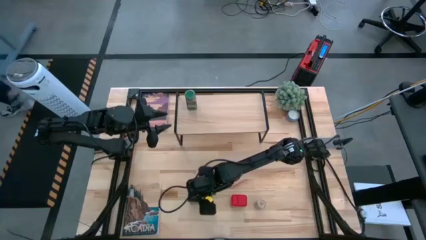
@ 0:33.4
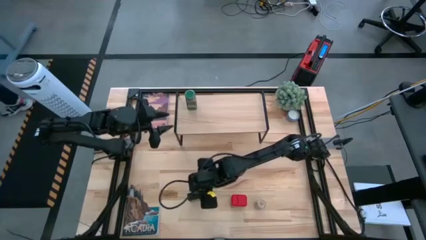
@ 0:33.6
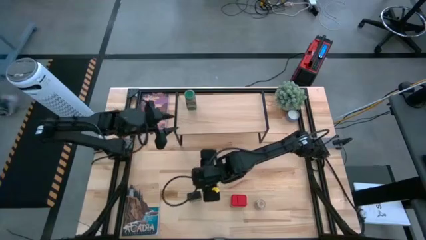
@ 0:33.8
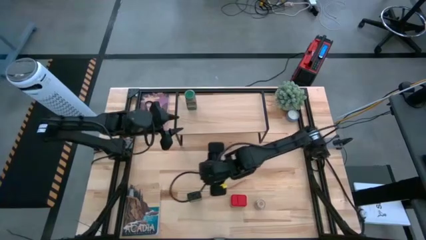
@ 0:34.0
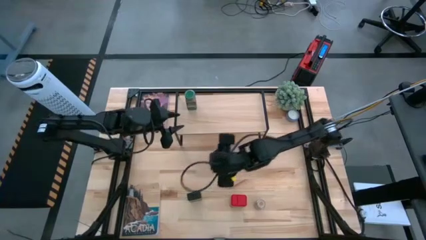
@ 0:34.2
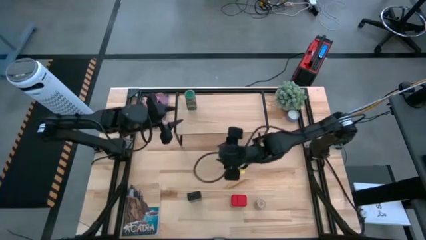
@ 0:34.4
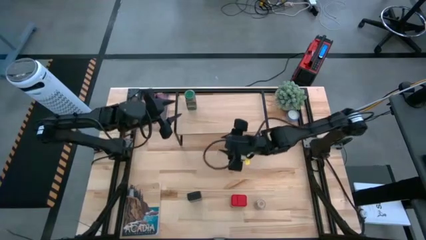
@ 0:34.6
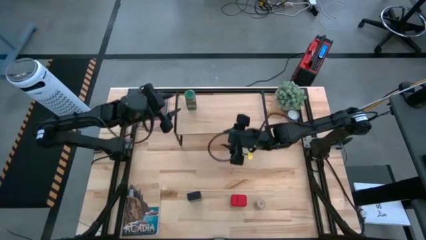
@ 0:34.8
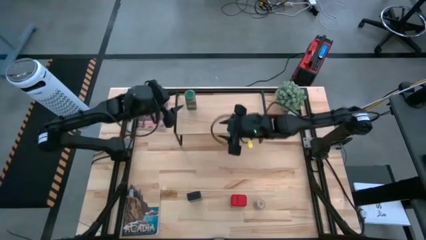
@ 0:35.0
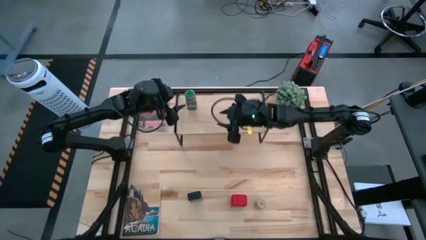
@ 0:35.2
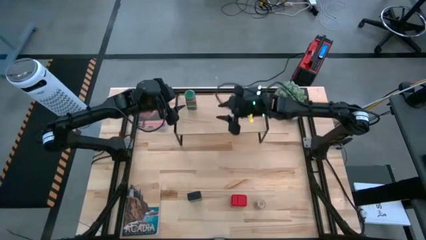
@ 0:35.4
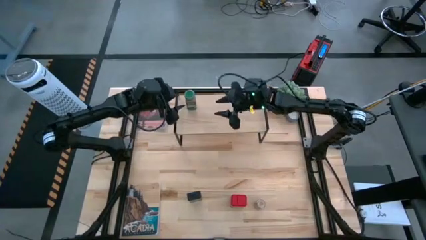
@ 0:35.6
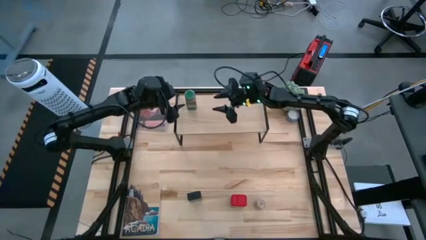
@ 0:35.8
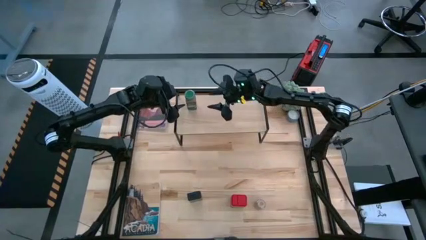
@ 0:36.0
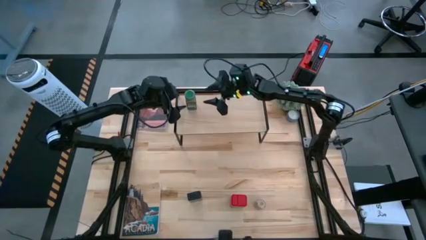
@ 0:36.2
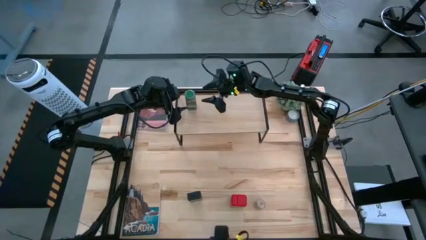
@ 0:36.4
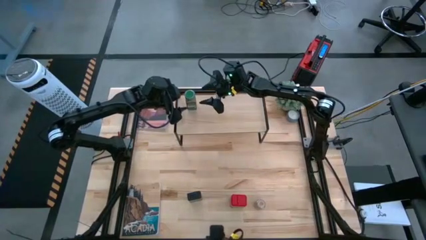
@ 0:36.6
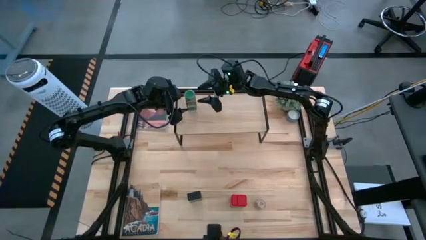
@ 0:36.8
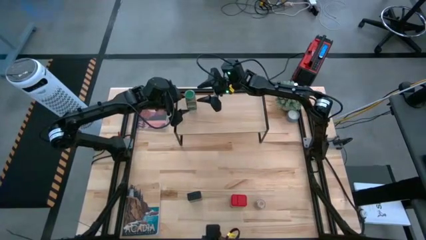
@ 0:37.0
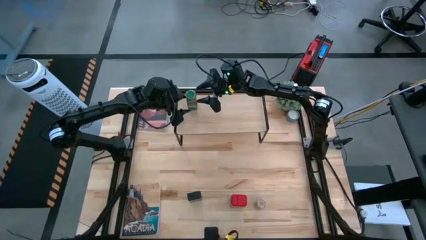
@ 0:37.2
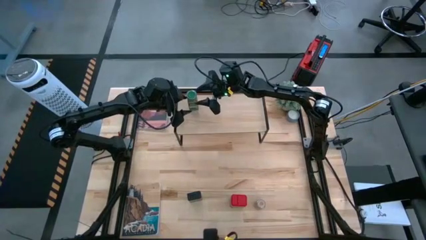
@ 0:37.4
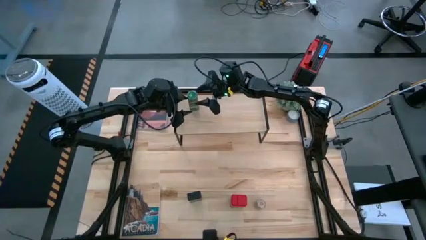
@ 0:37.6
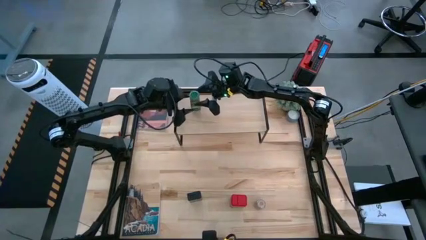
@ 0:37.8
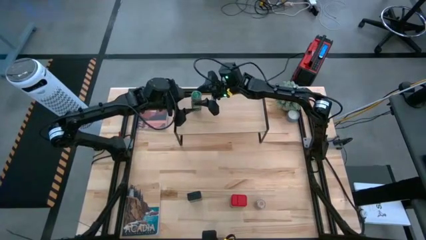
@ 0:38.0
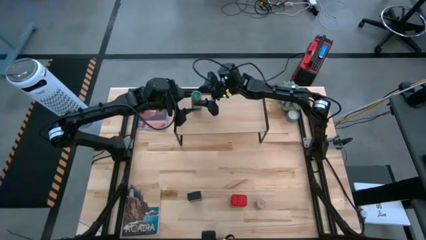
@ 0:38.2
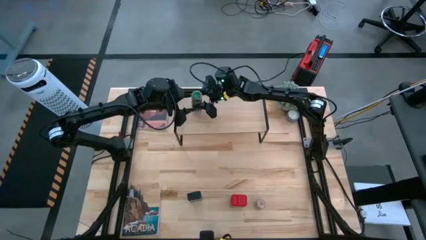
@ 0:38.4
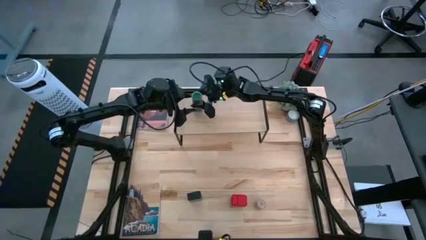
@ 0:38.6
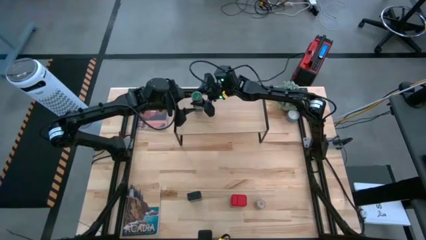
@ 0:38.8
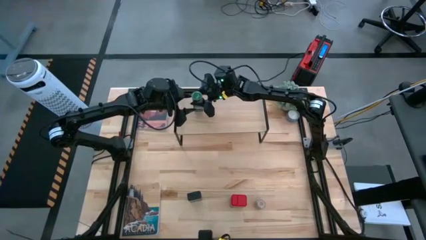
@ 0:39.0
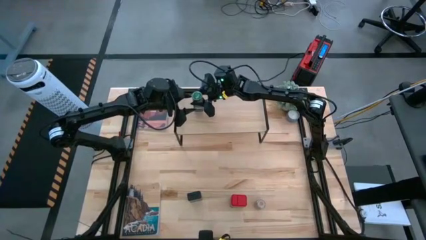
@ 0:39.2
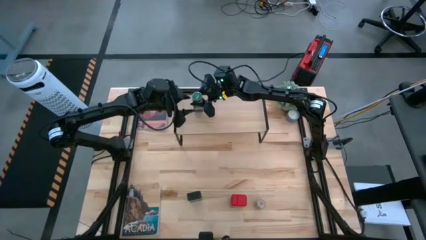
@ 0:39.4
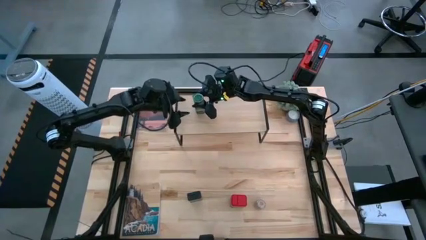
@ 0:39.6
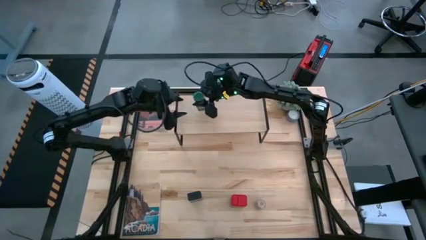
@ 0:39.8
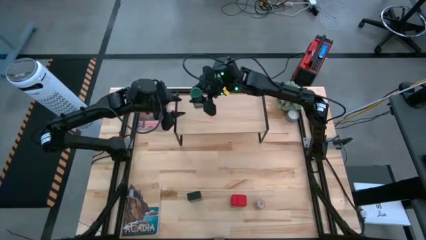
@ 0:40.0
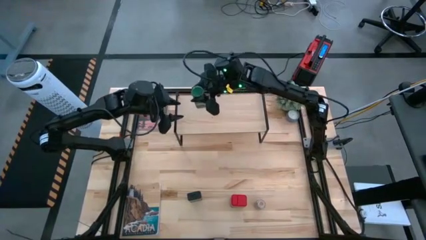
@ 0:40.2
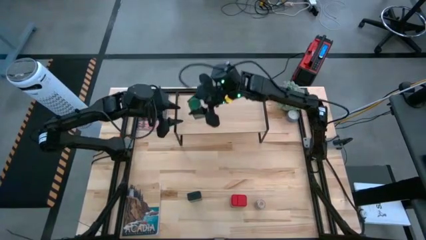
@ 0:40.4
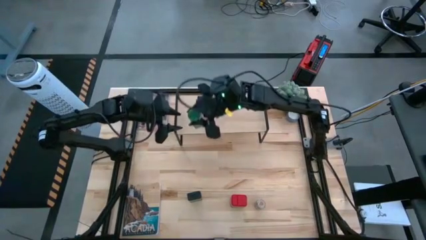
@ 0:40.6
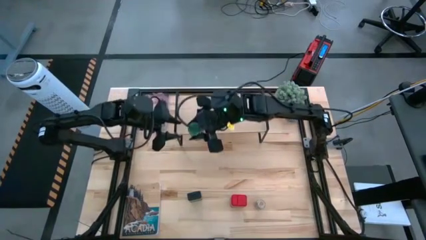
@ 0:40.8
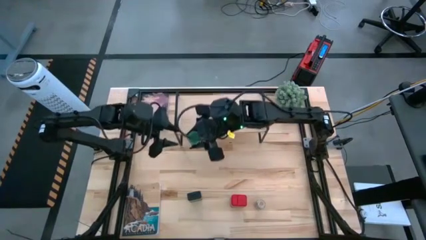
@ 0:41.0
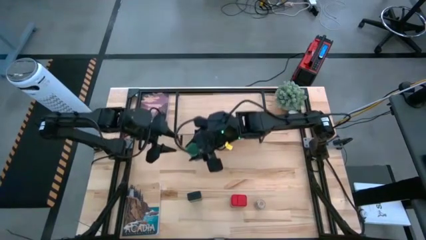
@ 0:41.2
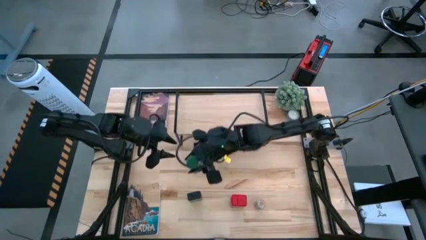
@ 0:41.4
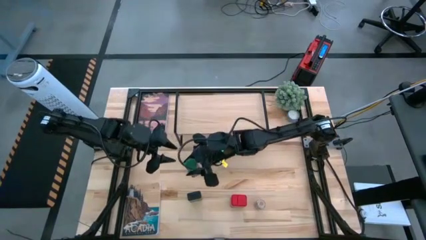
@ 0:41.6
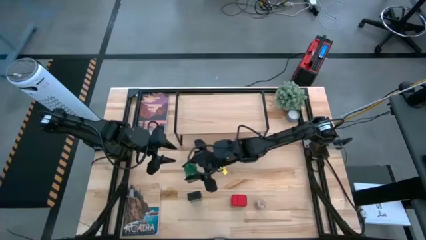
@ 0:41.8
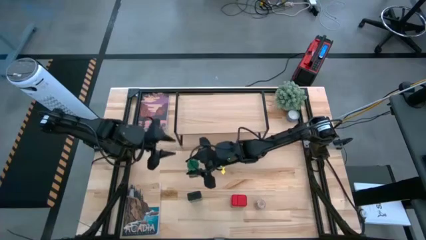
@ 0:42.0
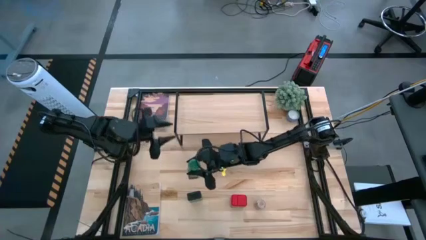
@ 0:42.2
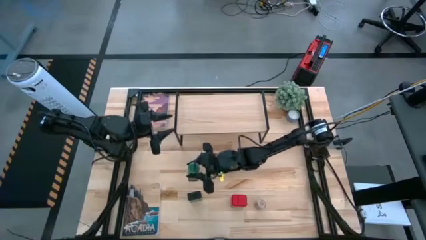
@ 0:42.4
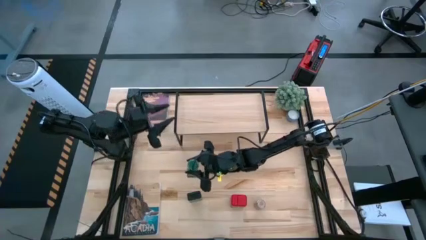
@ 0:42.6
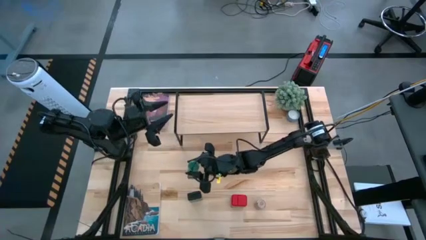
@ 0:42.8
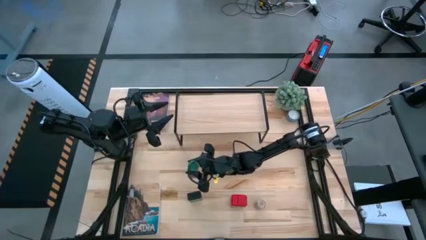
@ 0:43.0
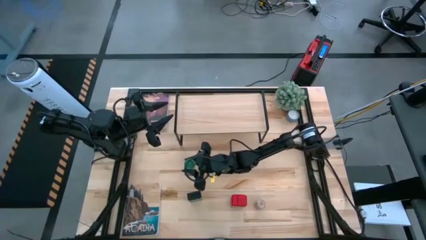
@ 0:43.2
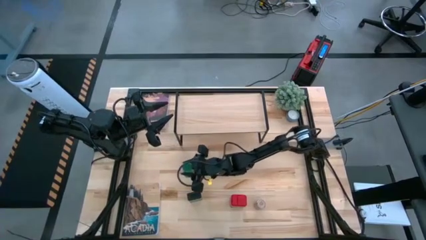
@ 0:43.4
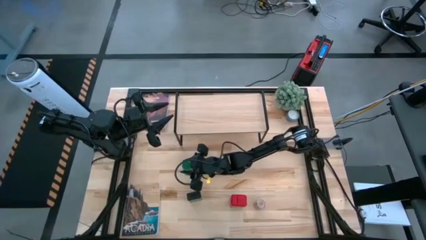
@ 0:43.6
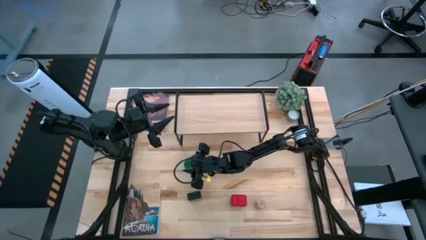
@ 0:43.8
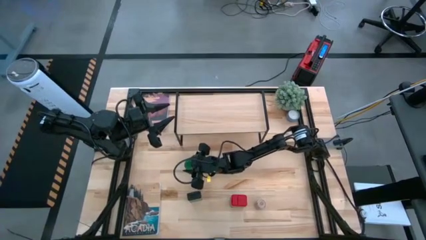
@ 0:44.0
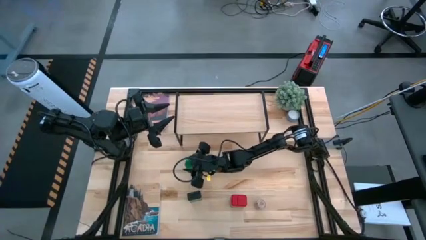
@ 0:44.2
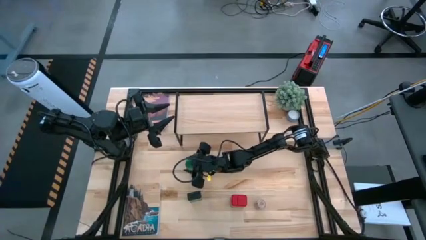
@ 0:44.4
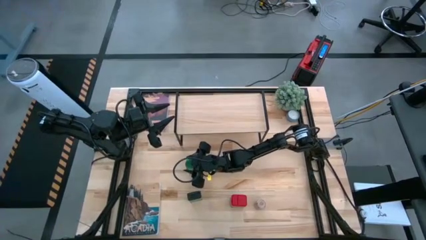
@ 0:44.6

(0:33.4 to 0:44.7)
Task: Shelf spices
Remove the green seasoning bottle from the shelf

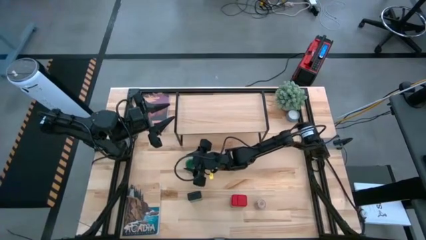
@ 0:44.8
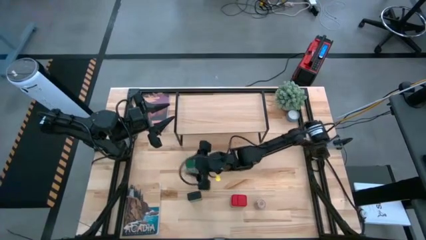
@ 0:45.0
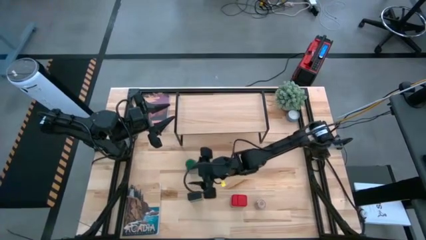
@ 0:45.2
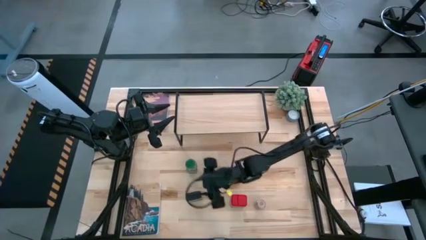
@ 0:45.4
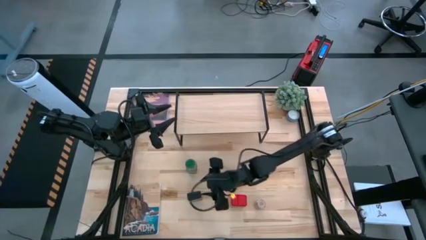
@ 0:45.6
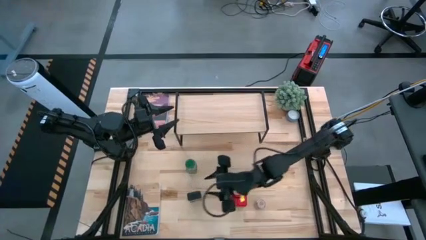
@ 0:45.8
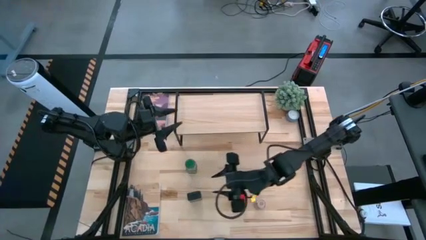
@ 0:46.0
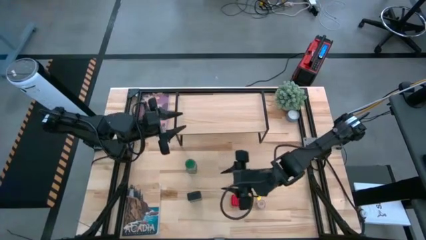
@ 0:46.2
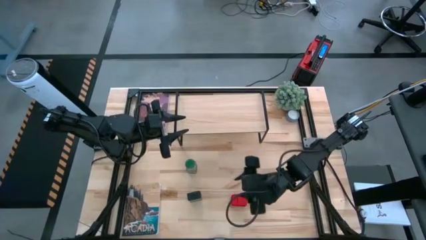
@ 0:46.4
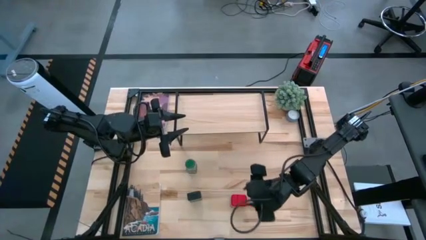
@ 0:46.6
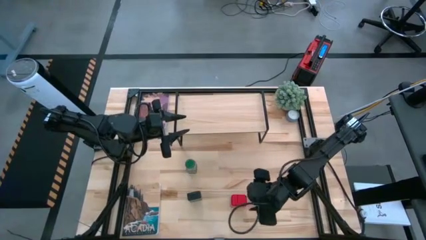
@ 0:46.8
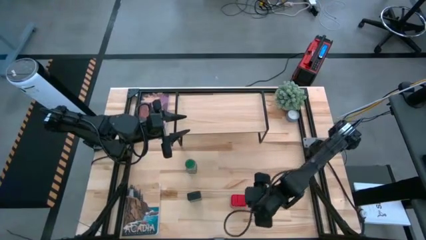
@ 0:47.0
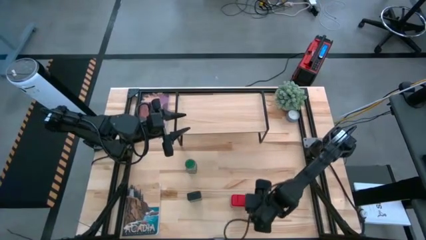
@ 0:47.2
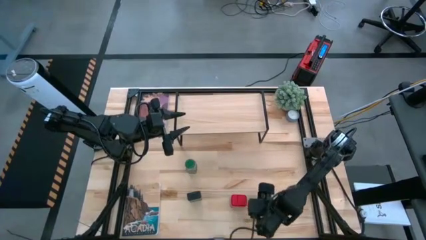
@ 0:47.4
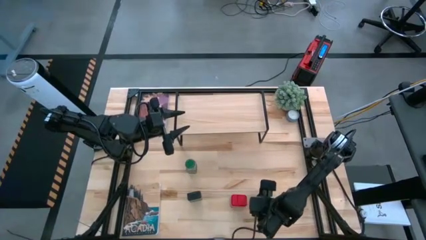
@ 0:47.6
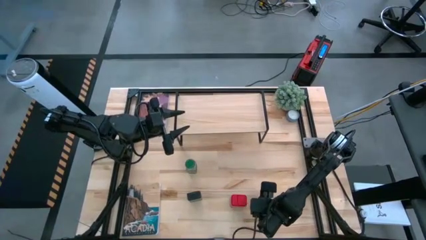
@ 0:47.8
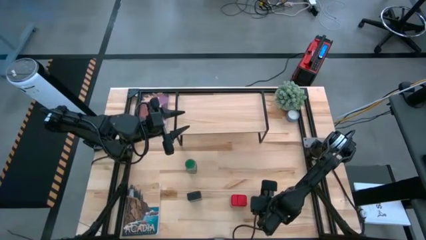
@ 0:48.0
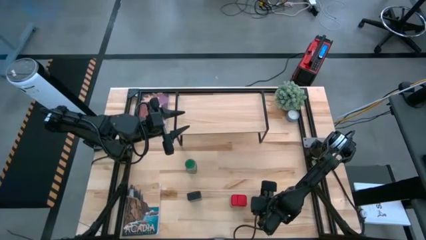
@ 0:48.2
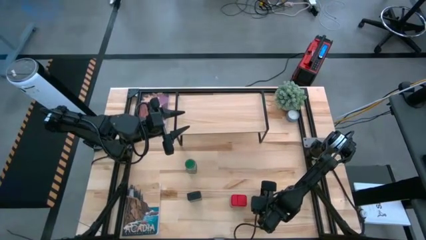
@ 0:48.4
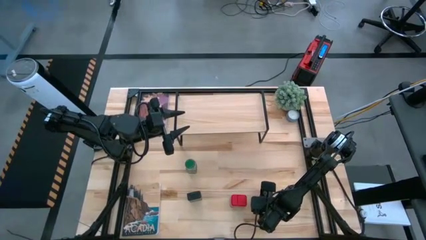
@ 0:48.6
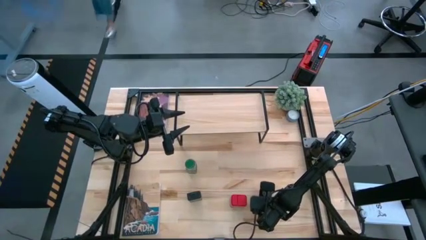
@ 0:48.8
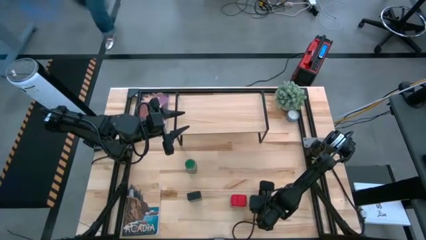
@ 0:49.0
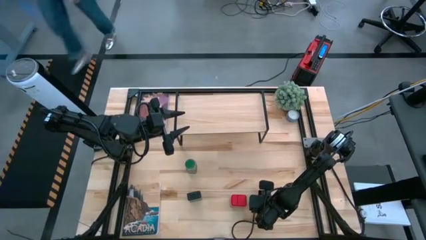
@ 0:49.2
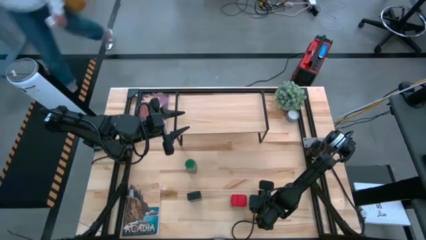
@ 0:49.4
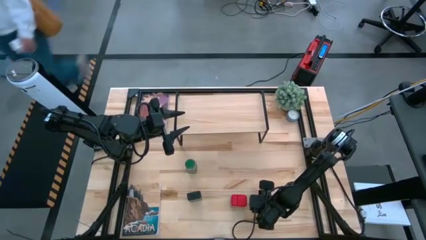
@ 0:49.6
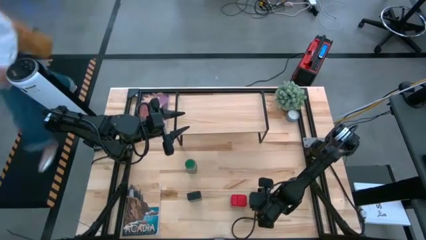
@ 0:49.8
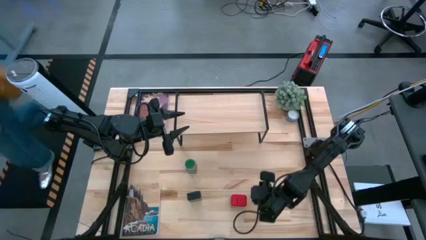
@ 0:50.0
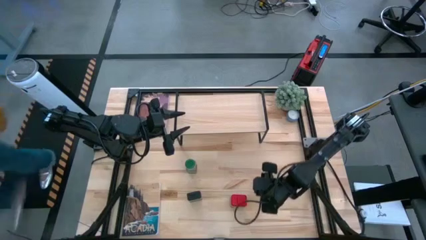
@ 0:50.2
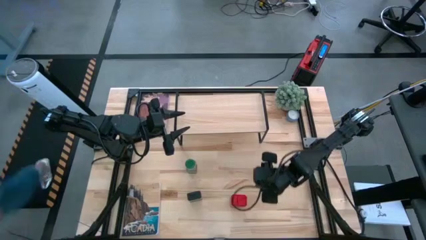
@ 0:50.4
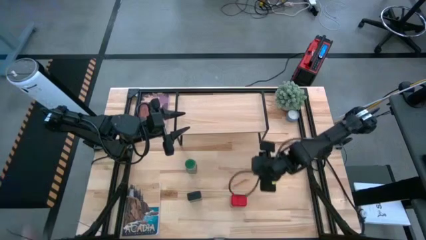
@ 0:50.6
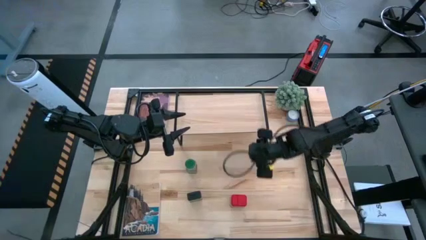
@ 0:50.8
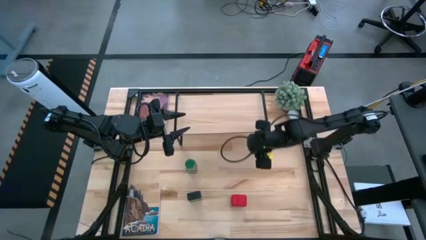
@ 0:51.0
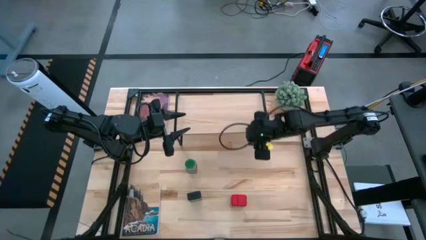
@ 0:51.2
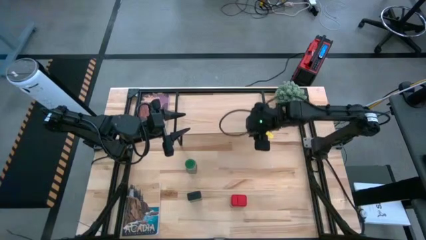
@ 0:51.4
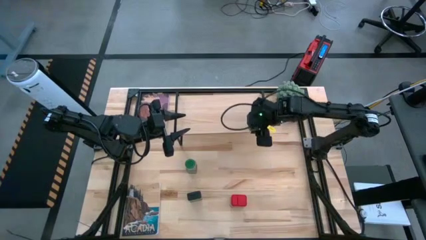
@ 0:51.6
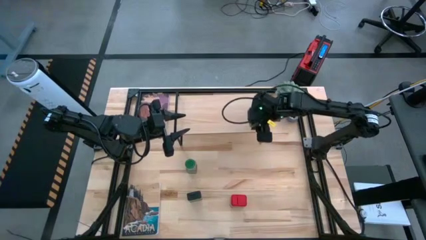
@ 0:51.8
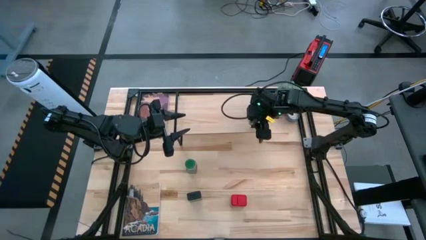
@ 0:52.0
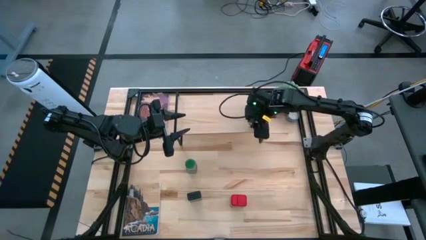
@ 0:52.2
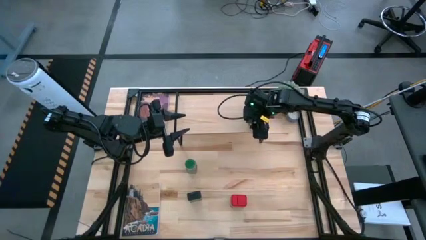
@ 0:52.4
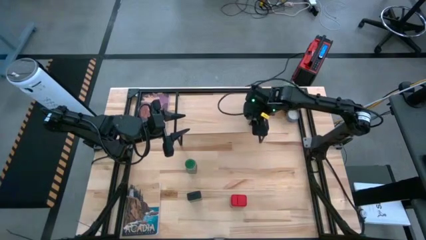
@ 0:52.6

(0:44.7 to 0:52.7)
Put the brown seasoning bottle on the shelf
